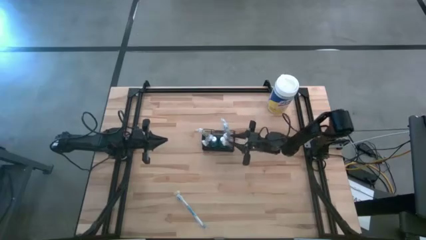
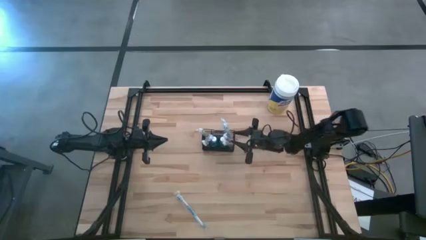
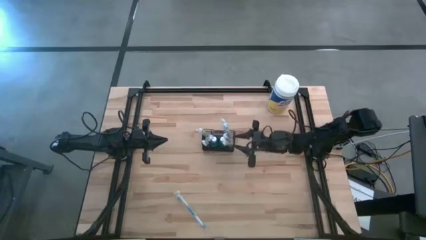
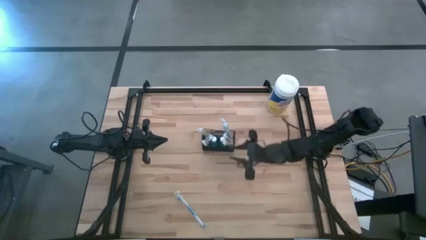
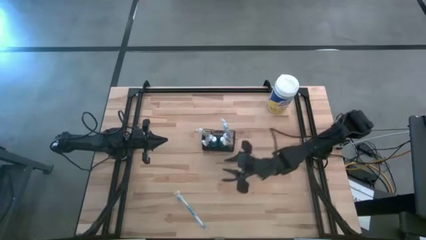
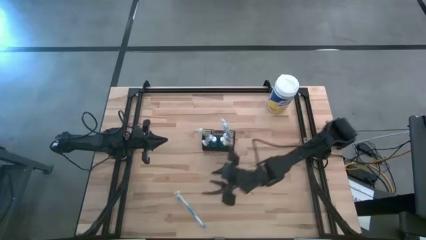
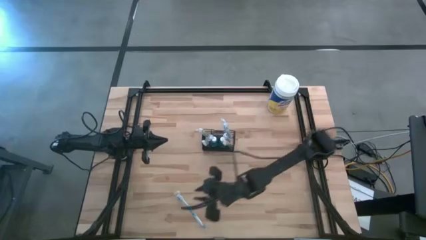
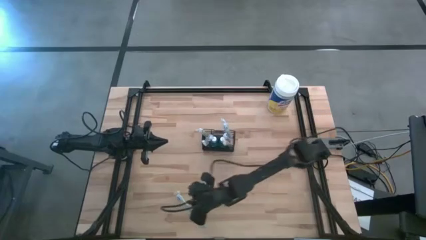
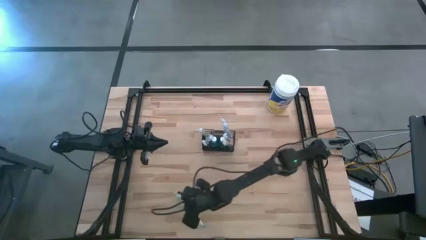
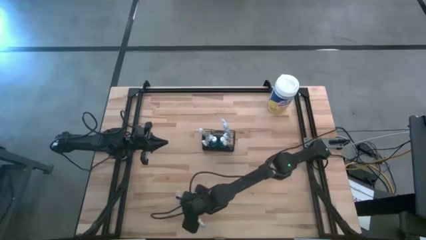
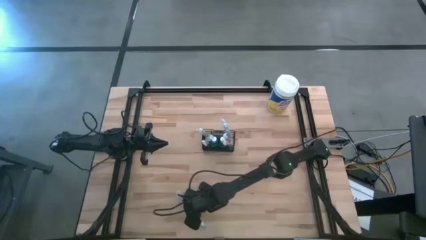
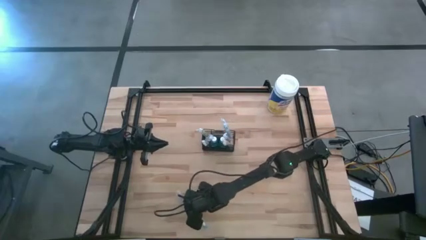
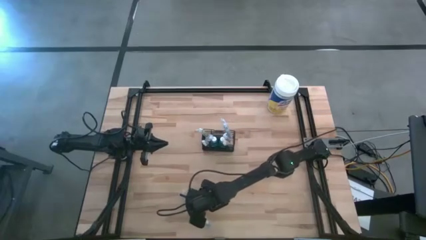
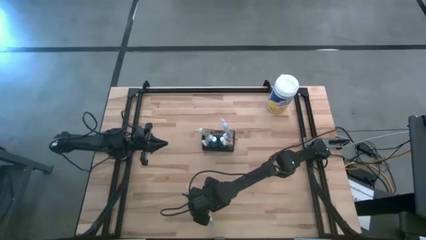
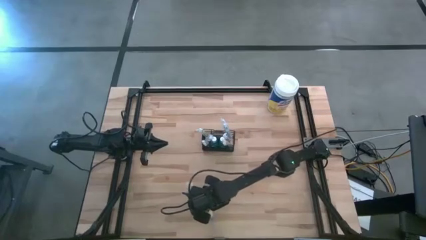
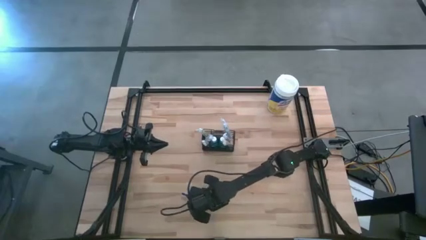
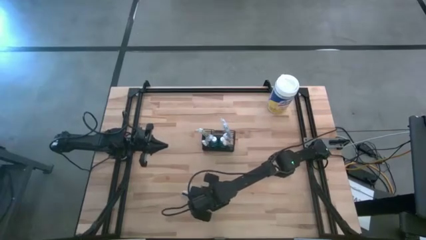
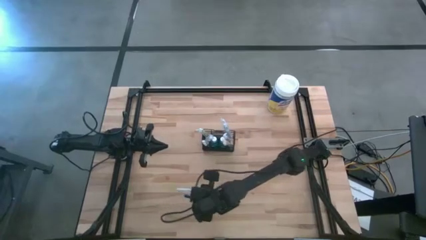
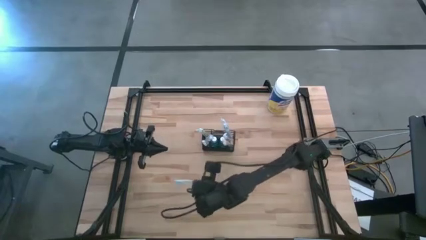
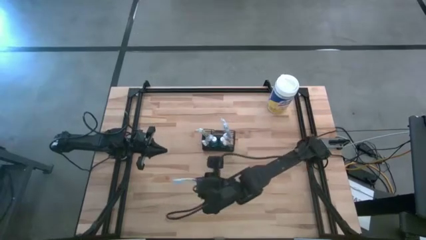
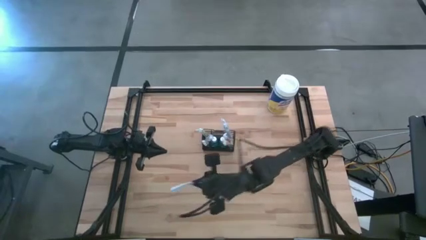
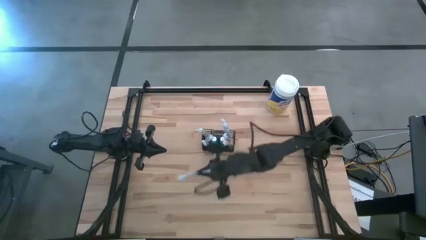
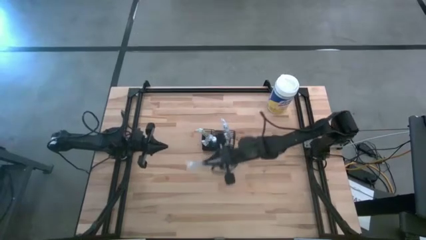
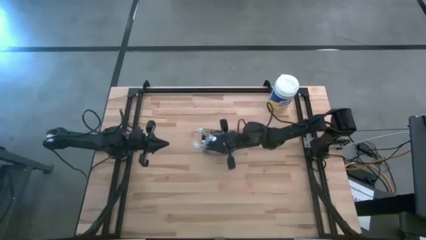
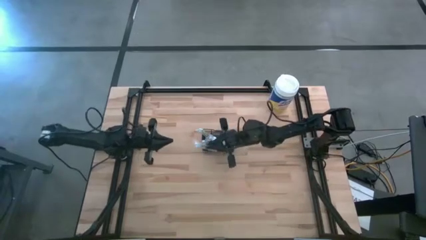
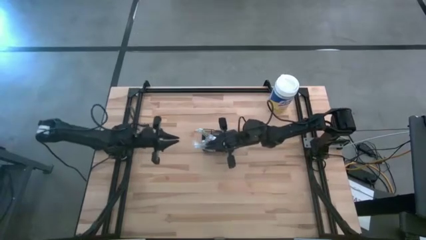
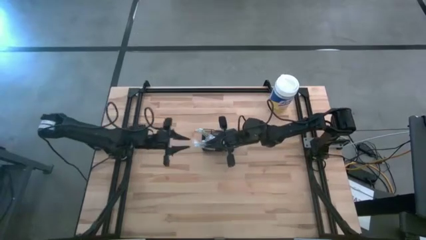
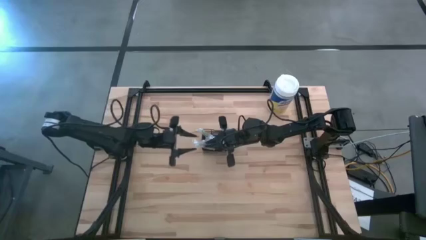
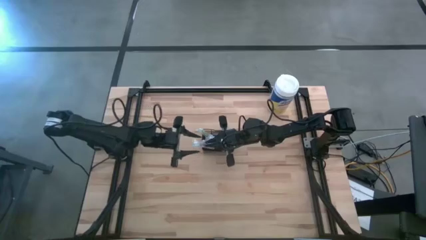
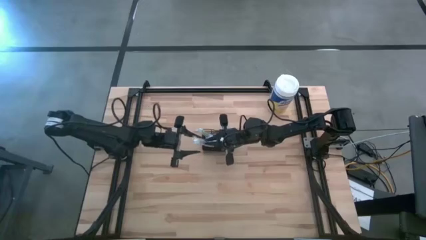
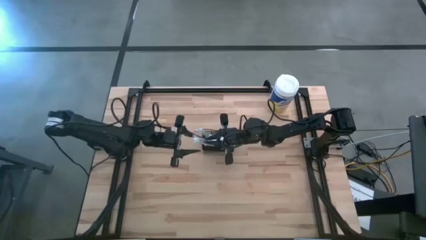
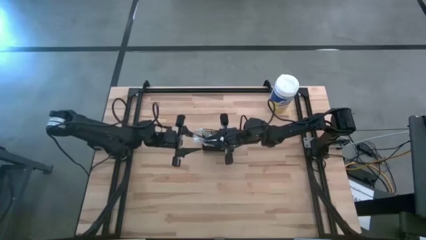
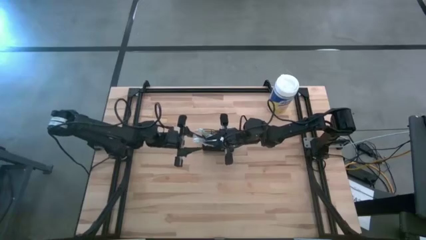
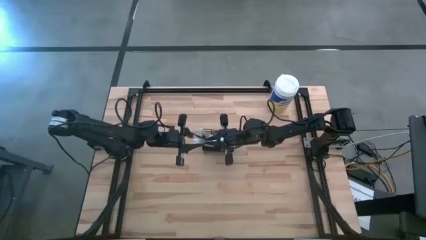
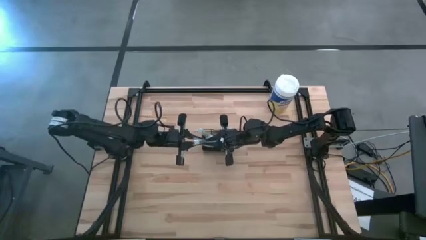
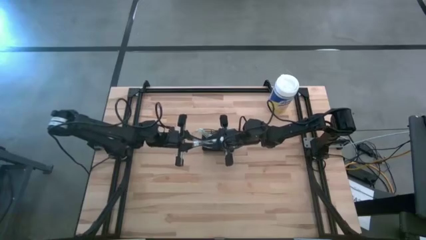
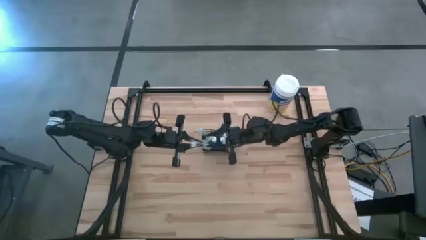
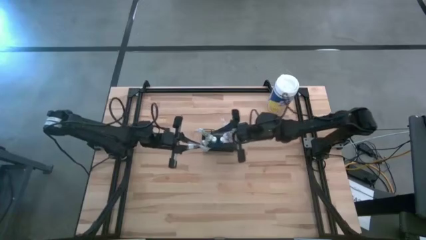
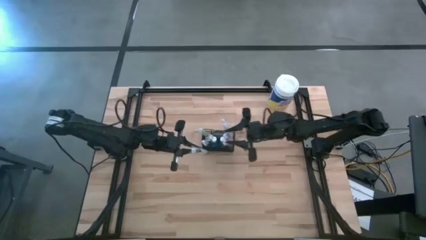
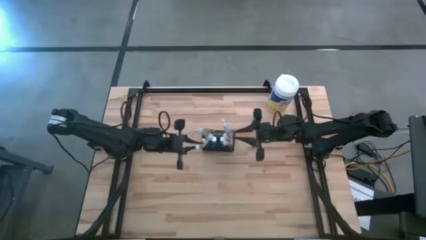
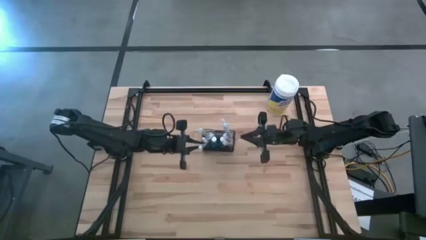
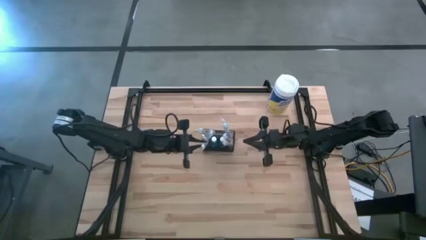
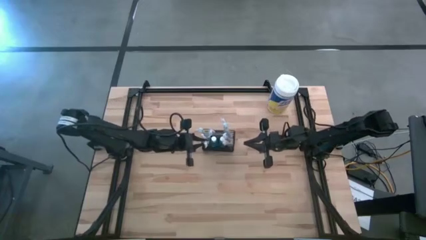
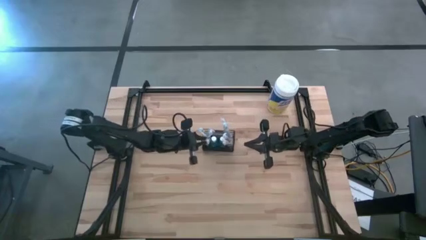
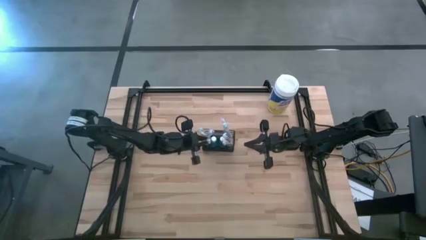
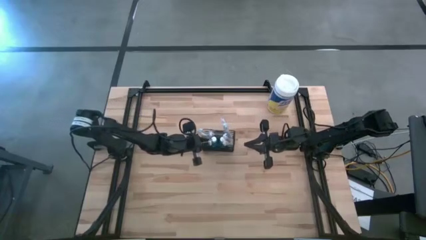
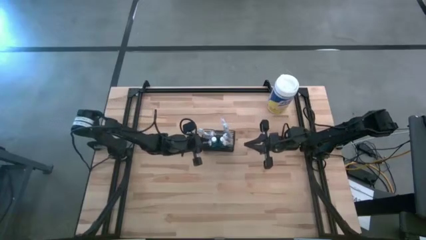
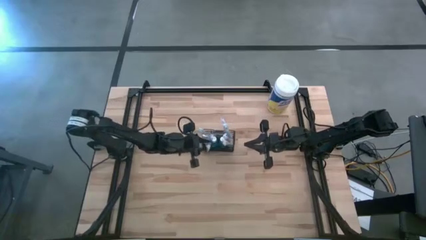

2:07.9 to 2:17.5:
Task: Pick & Place toothbrushing station
Put the blue toothbrush into the wire organizer

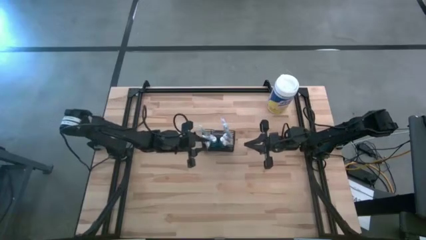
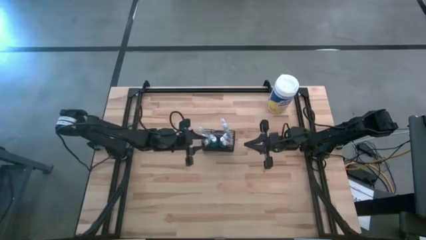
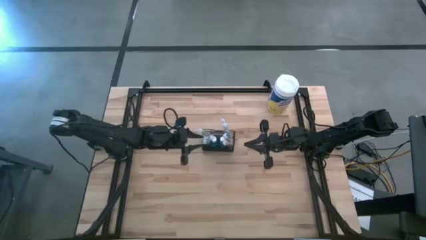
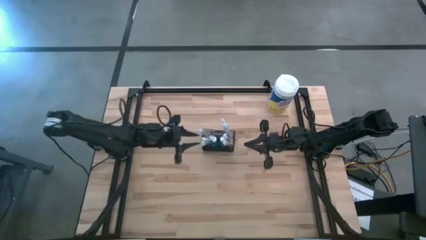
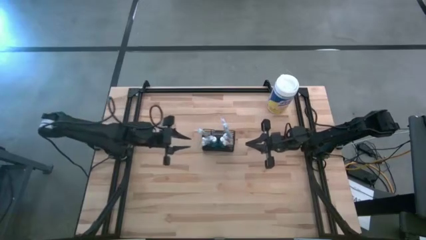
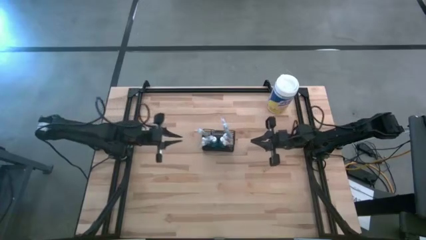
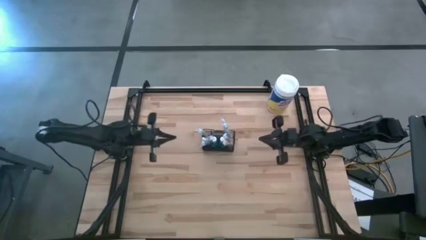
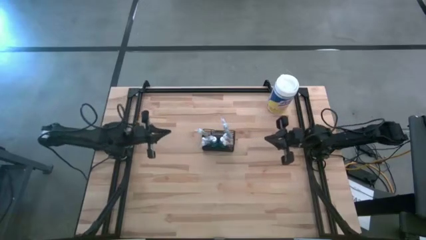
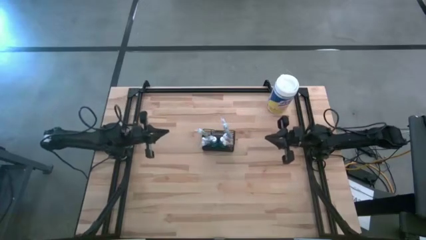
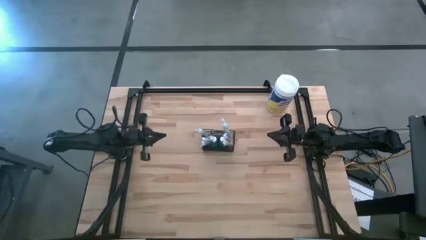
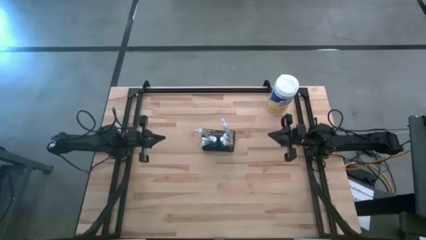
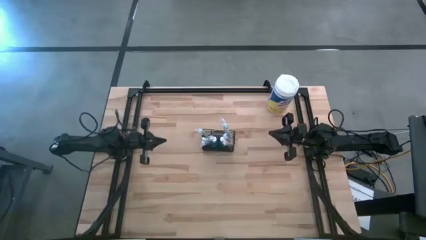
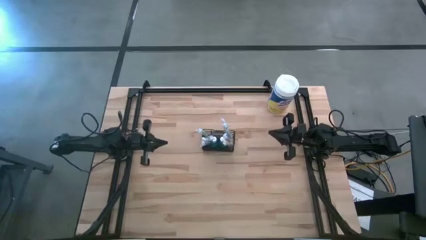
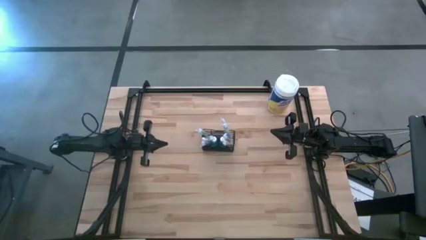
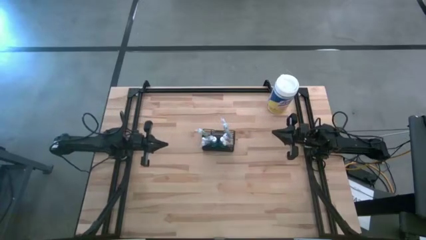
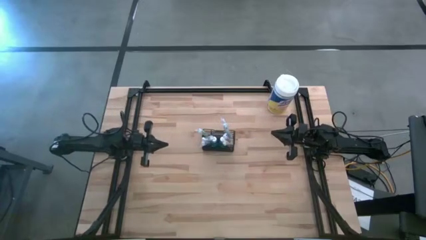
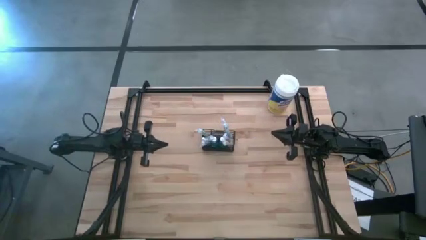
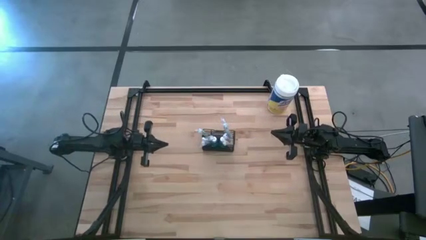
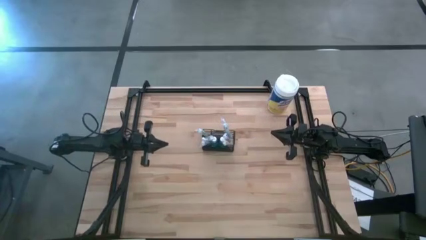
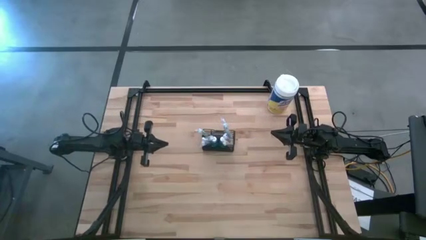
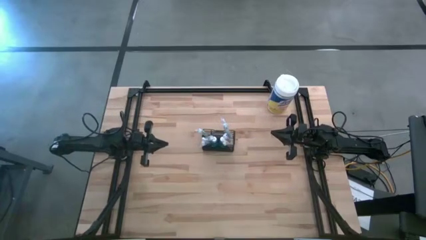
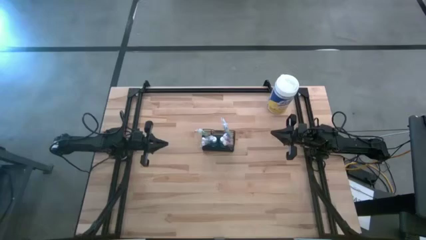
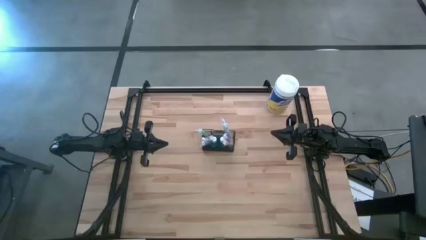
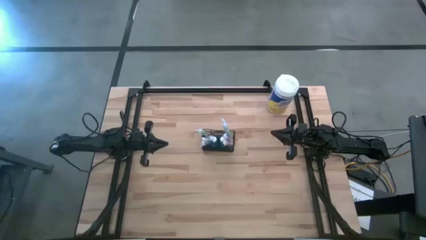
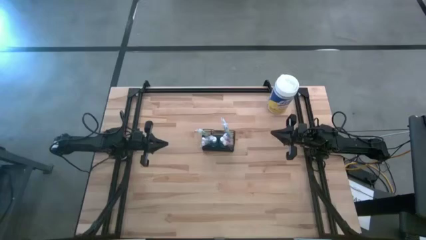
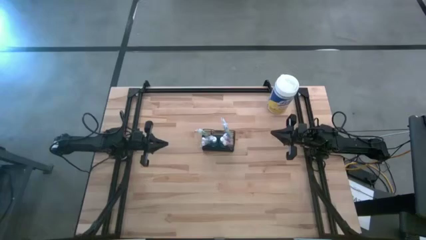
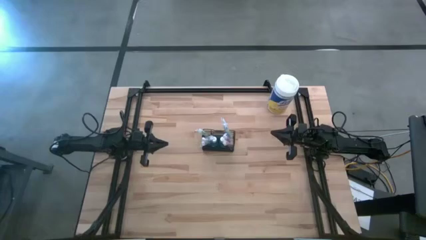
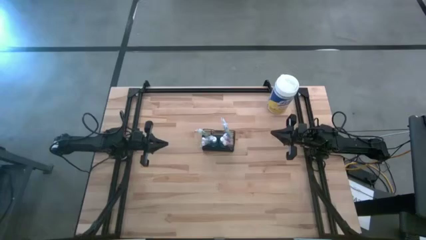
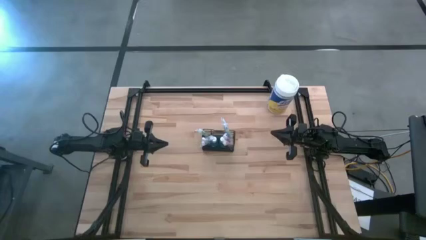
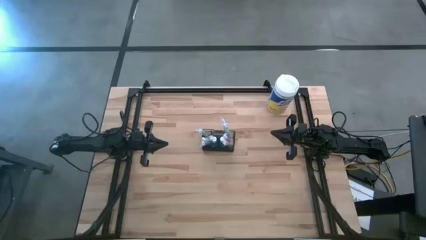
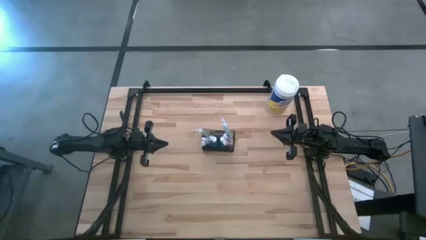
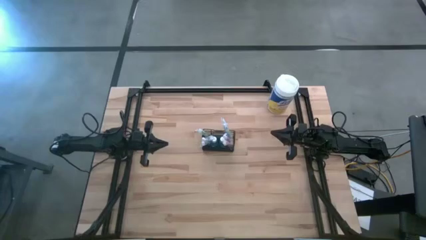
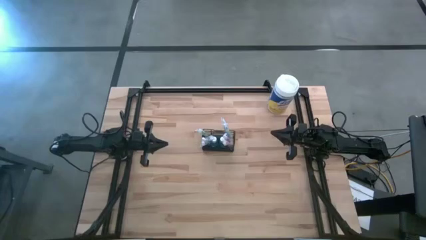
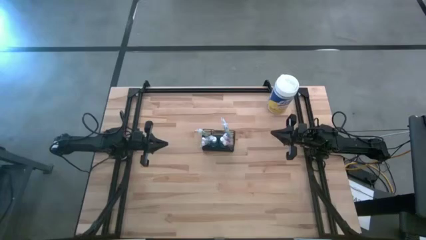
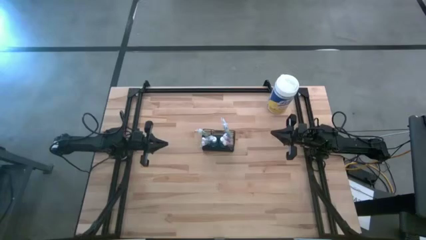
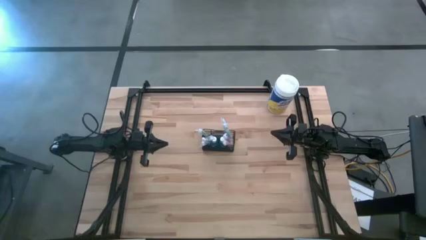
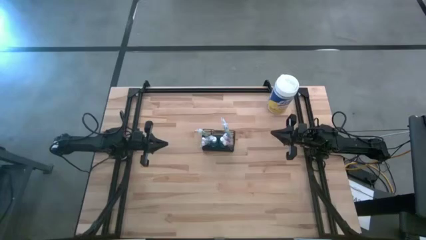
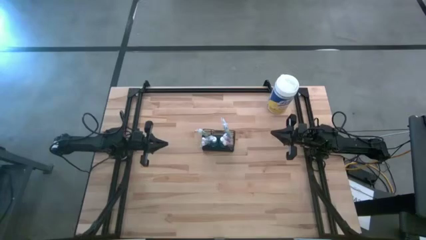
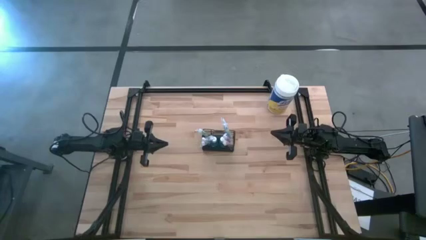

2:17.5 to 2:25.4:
Return to Home Position
